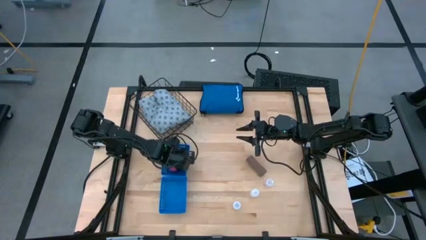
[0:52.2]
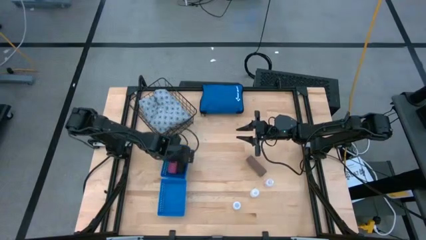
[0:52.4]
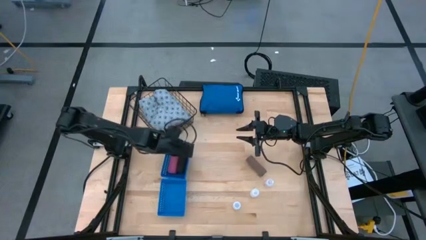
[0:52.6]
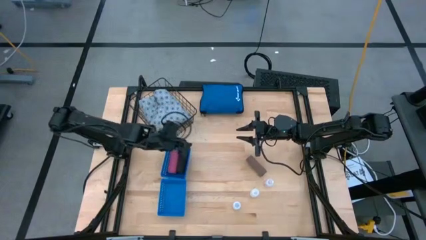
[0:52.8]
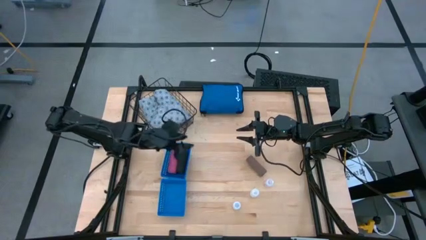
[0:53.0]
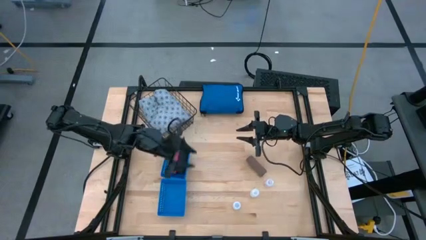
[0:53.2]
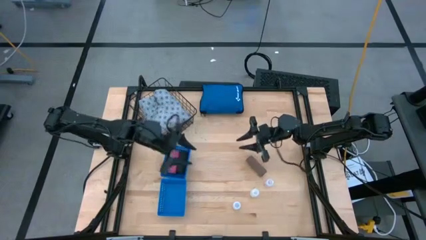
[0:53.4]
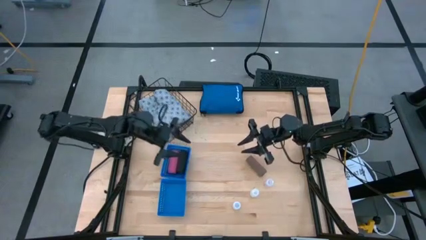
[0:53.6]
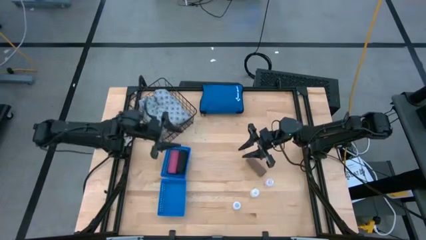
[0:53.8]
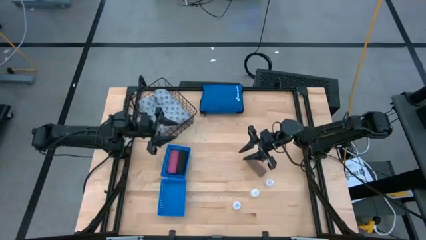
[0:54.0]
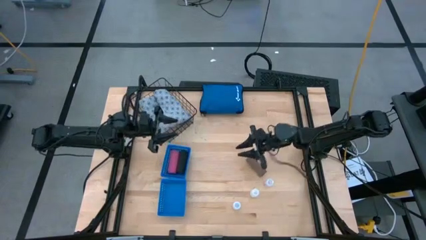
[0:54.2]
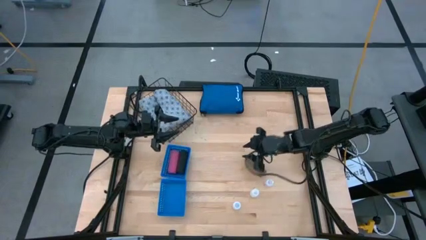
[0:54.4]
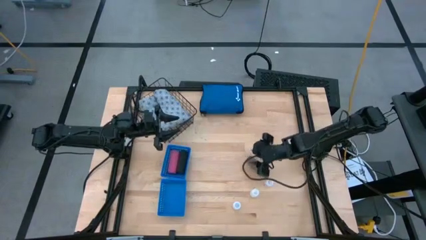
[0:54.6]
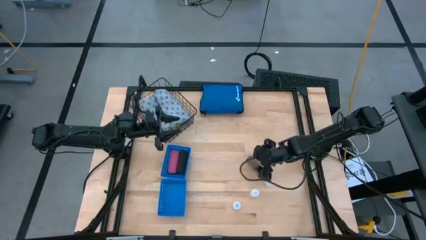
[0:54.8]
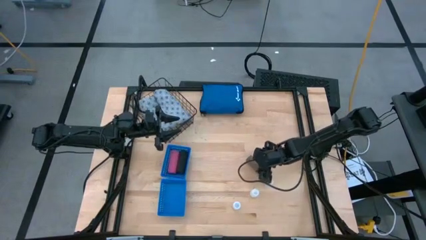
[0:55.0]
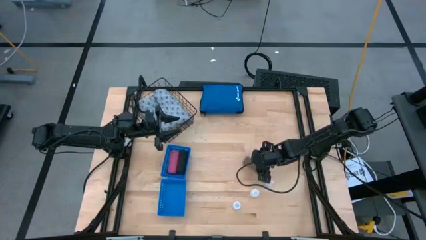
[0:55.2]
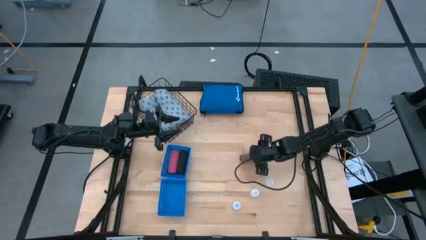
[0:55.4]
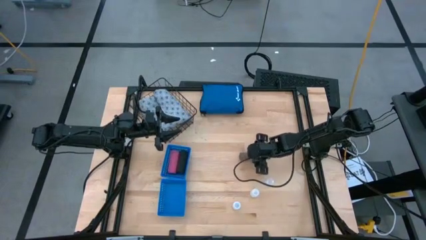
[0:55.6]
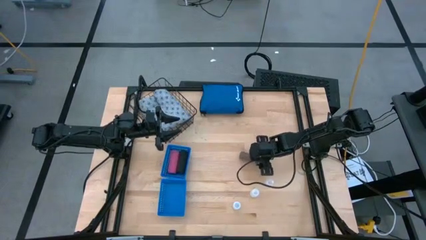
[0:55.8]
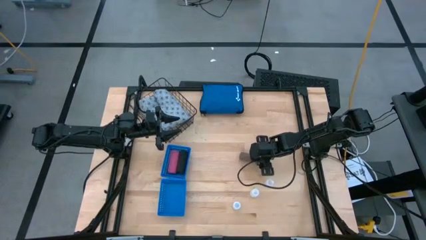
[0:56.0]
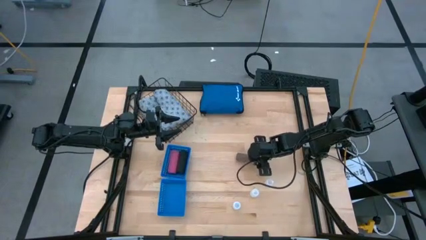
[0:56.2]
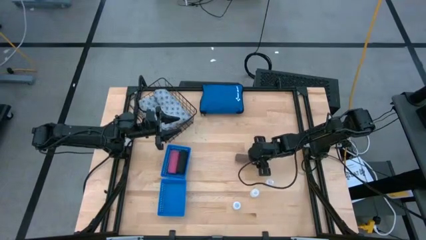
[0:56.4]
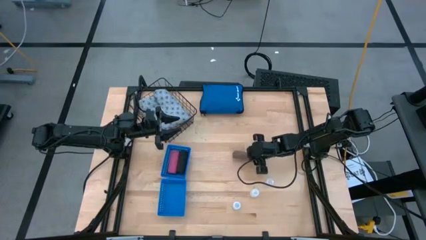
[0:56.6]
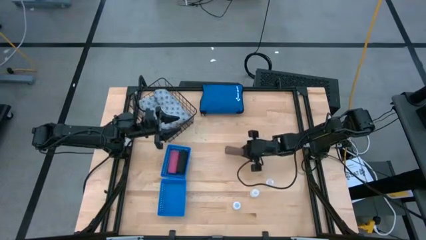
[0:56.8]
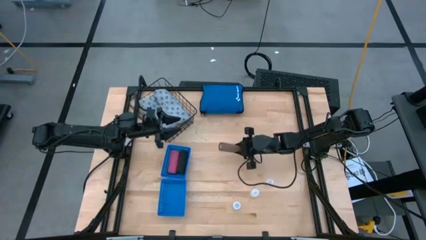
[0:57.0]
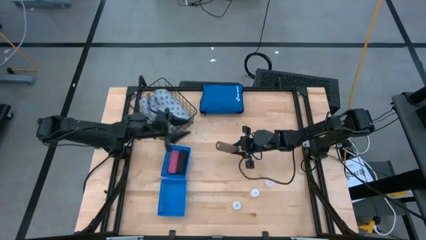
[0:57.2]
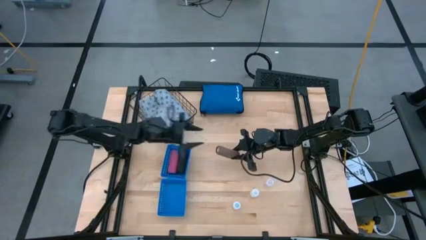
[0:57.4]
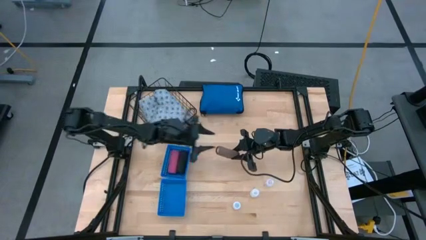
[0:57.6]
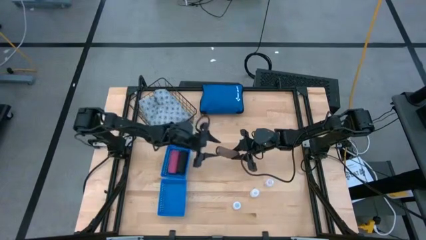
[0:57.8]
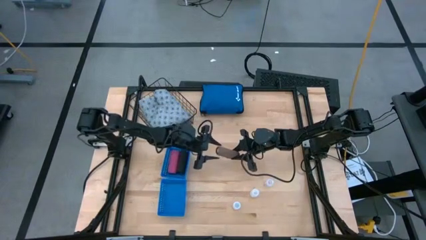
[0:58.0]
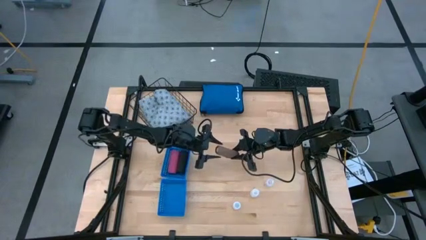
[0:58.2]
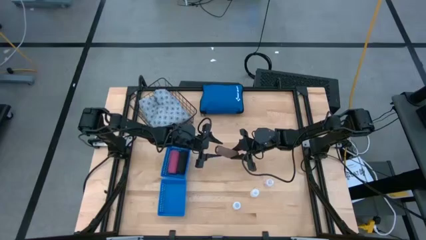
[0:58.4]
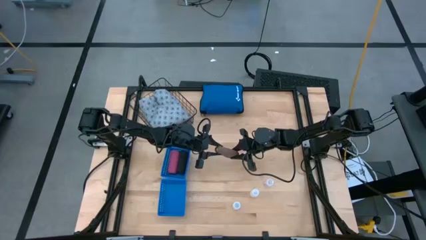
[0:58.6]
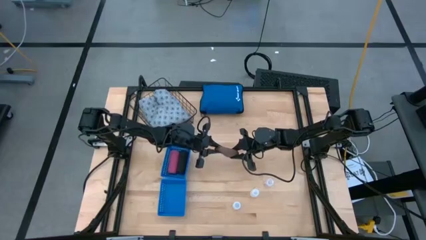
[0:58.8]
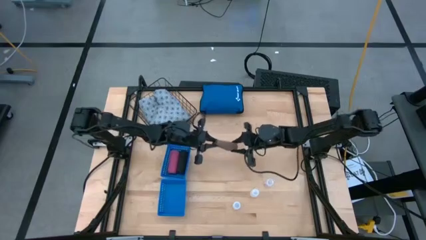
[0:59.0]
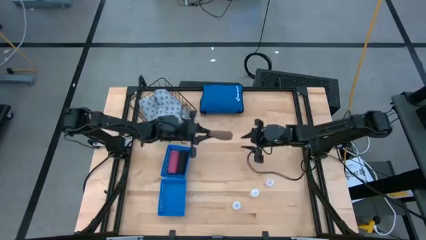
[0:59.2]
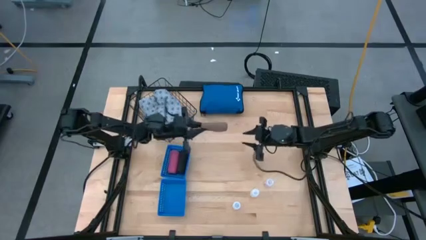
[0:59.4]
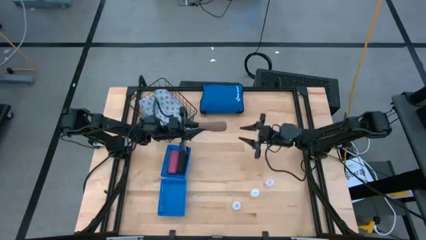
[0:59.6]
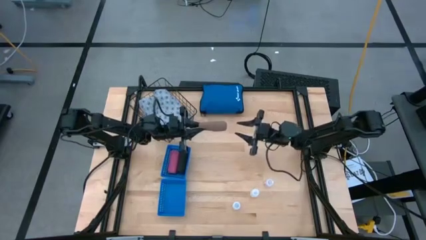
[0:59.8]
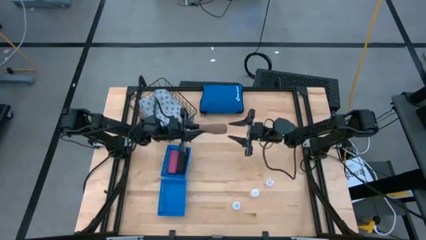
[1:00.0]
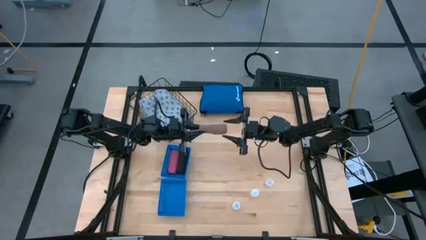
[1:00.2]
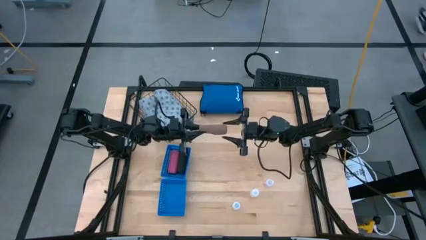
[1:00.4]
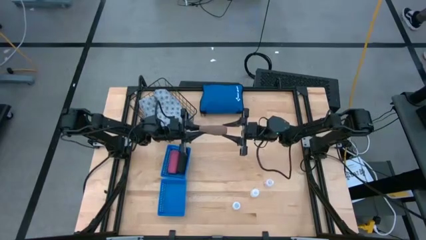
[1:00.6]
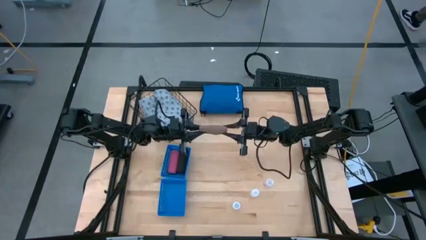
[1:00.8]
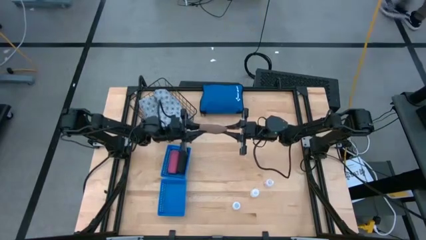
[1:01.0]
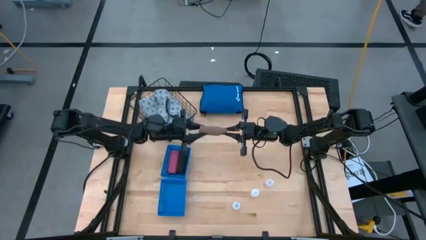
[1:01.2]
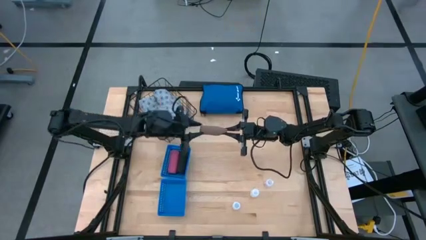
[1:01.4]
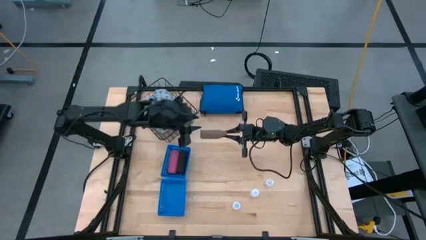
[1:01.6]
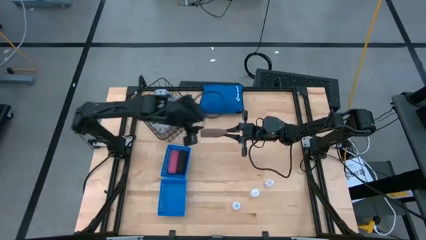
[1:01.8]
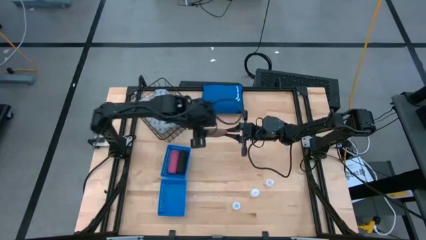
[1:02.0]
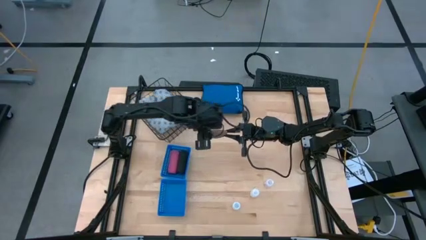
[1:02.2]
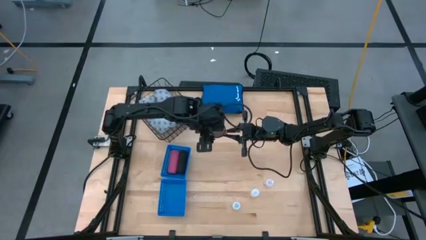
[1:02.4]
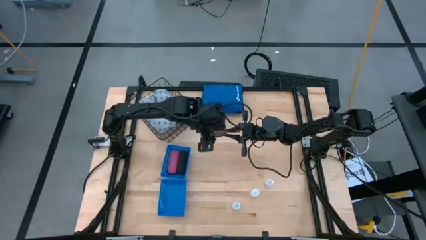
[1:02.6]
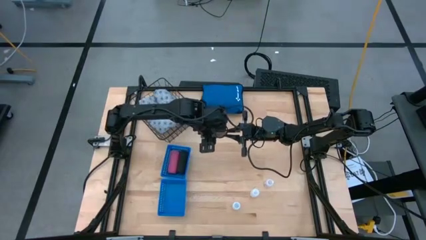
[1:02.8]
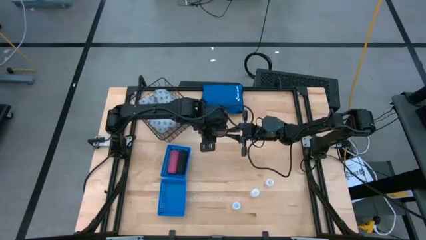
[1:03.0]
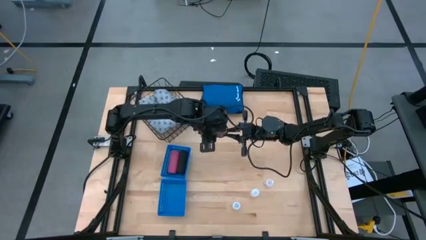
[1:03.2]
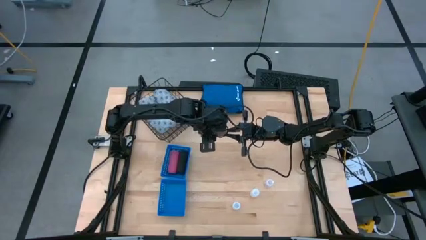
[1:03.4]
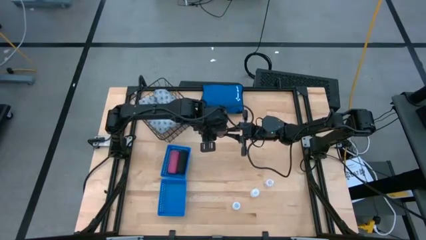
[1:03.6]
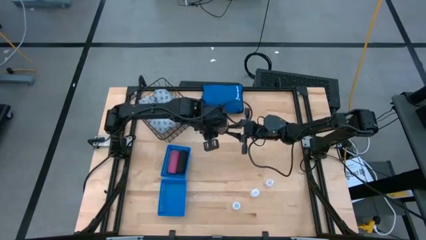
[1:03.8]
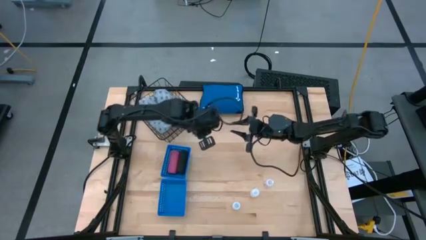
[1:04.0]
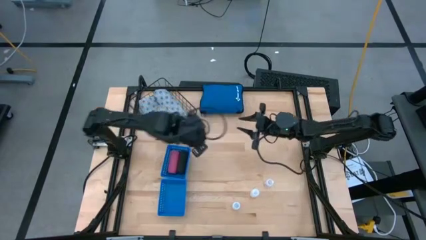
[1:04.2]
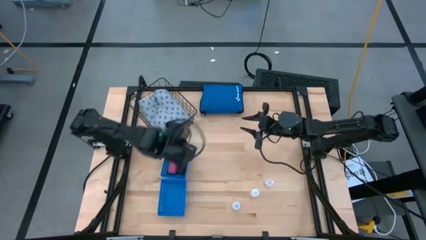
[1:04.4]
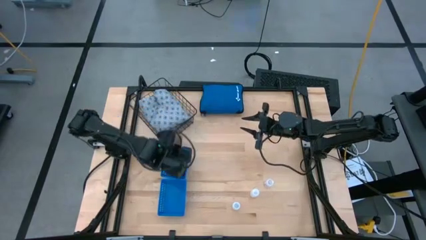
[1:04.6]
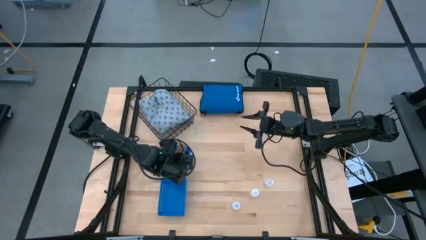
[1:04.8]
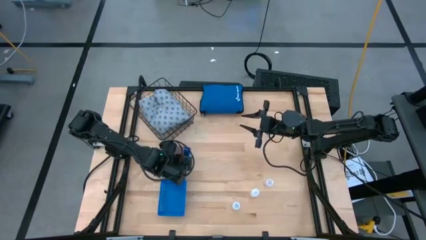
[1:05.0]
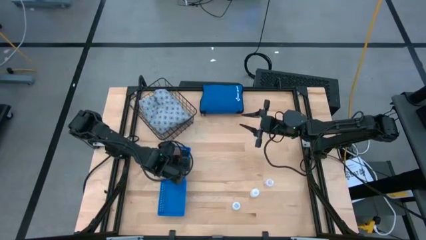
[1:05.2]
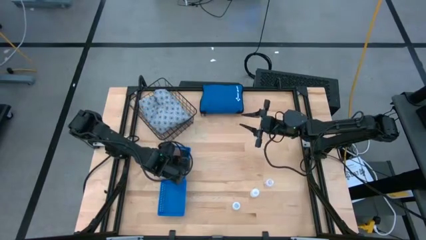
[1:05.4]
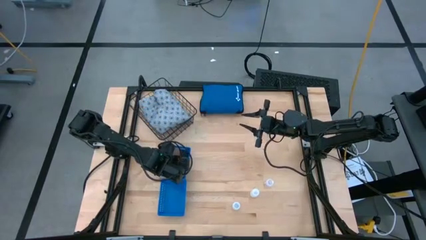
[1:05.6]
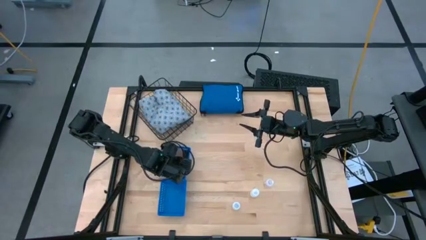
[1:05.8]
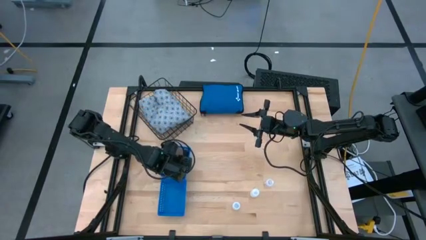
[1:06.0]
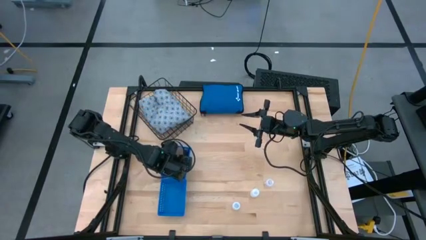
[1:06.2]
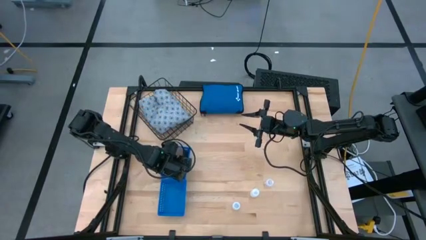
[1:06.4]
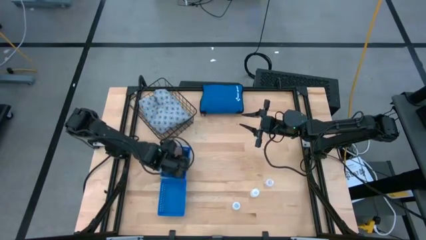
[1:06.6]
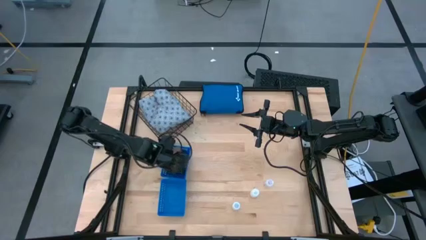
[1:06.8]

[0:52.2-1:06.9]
Task: Pick & place medical supplies in basket/bin
Put the brown bandage into the top blue bin
